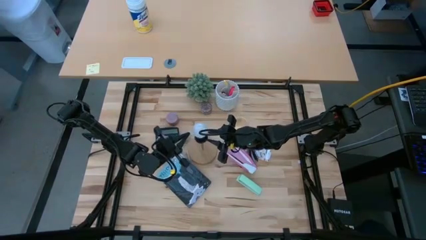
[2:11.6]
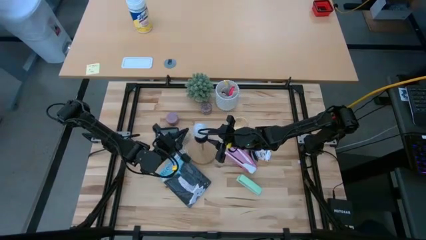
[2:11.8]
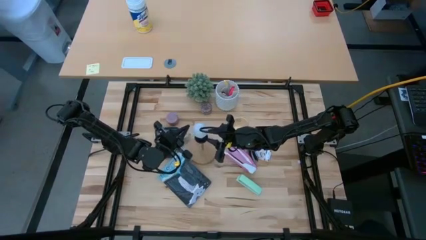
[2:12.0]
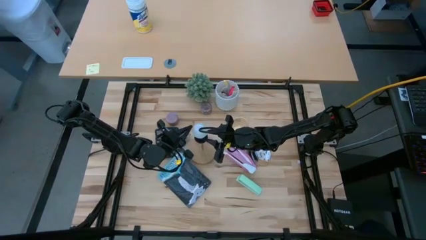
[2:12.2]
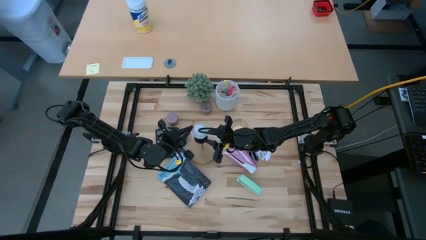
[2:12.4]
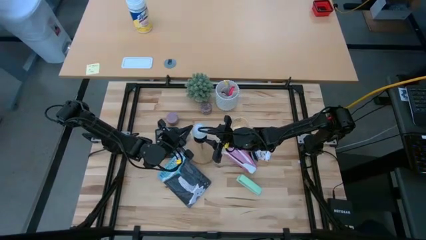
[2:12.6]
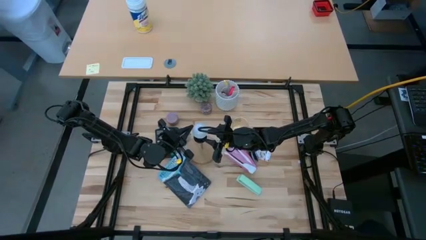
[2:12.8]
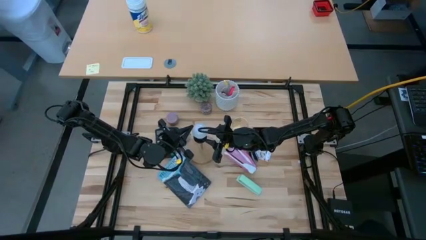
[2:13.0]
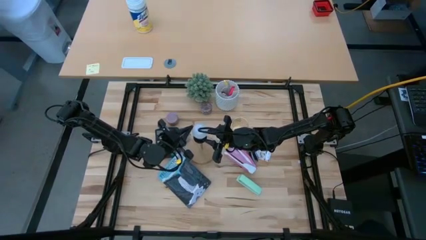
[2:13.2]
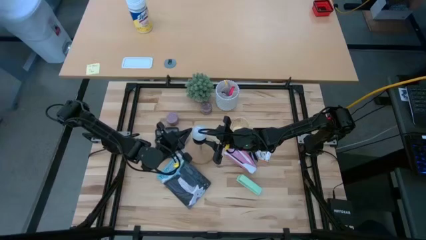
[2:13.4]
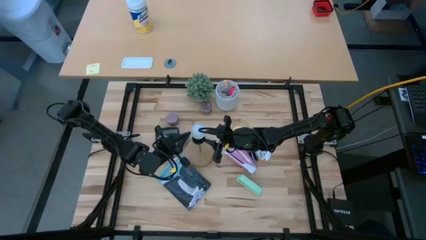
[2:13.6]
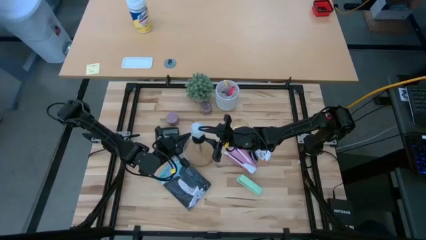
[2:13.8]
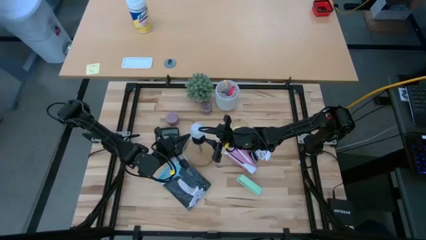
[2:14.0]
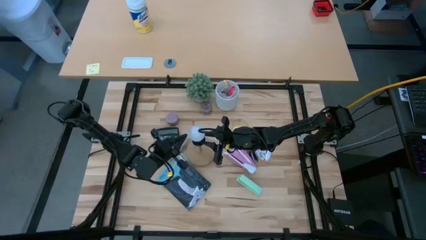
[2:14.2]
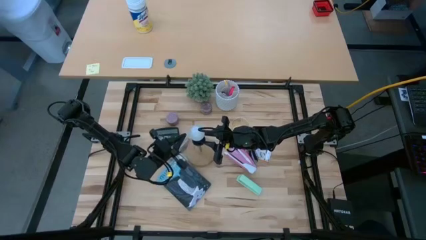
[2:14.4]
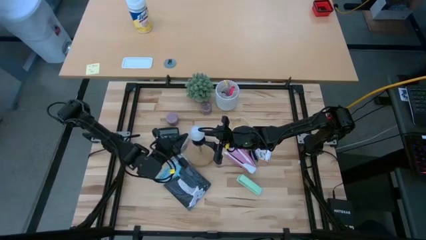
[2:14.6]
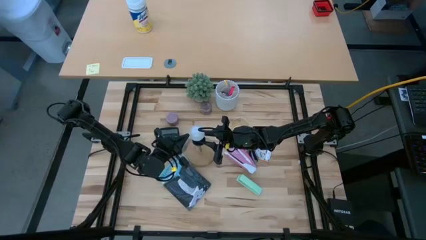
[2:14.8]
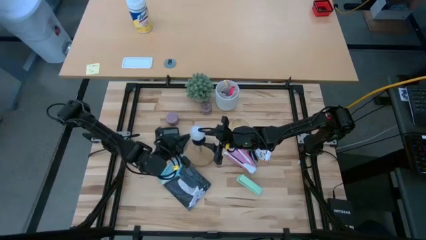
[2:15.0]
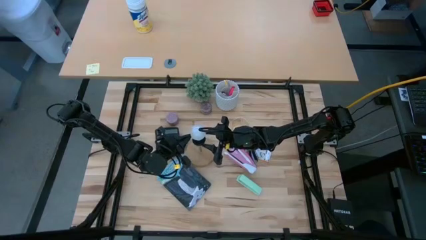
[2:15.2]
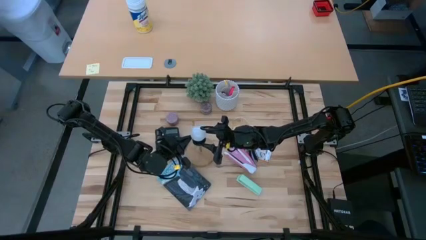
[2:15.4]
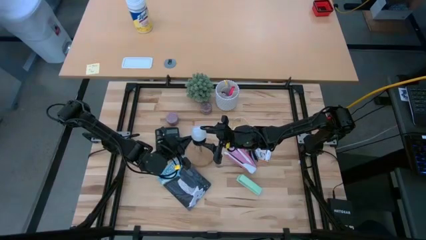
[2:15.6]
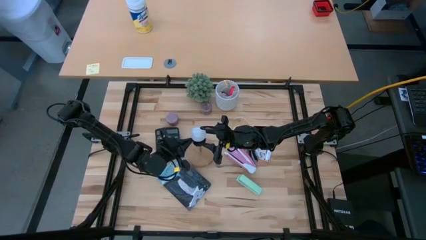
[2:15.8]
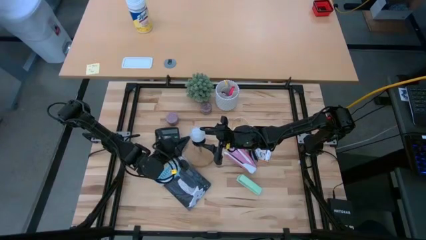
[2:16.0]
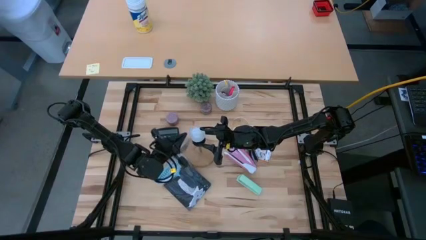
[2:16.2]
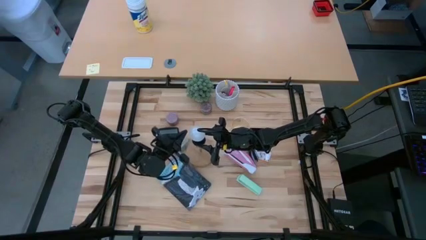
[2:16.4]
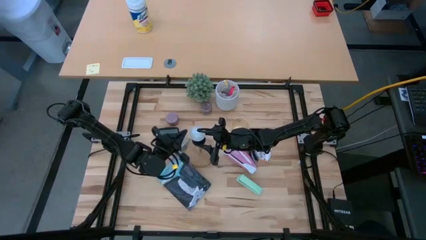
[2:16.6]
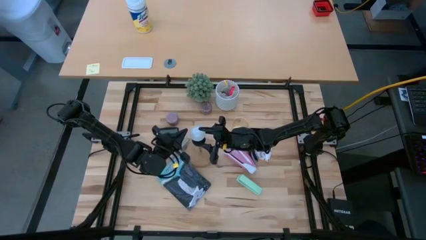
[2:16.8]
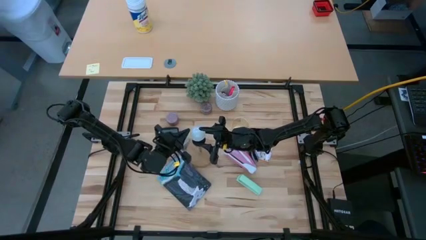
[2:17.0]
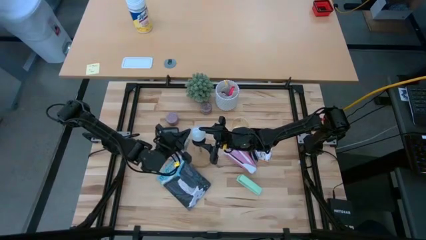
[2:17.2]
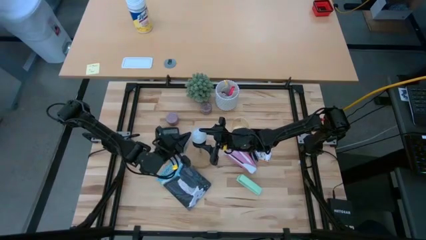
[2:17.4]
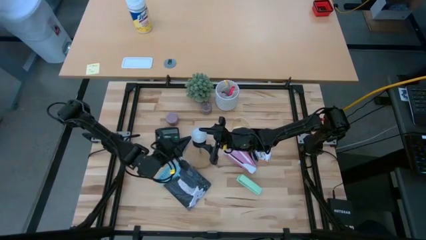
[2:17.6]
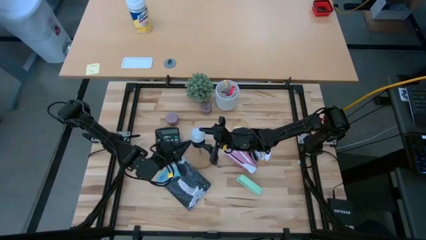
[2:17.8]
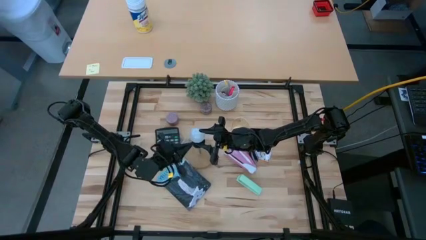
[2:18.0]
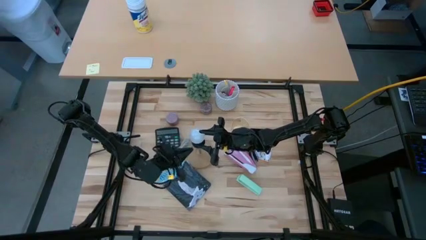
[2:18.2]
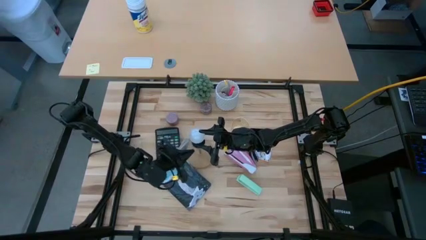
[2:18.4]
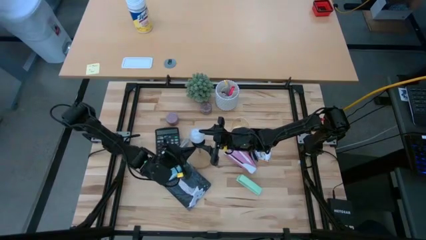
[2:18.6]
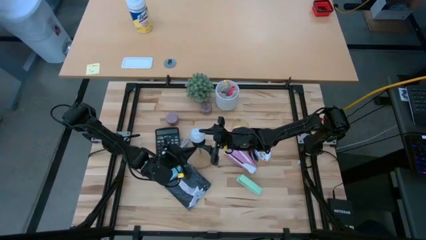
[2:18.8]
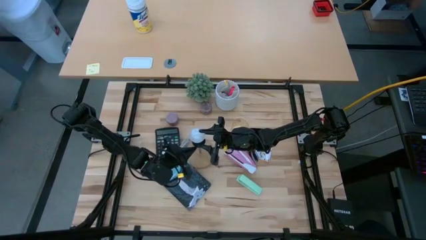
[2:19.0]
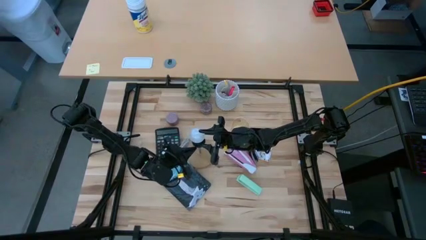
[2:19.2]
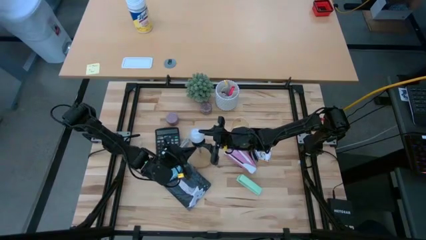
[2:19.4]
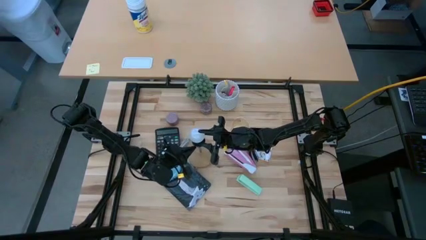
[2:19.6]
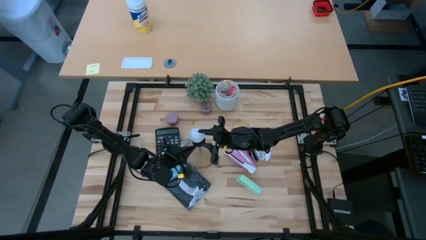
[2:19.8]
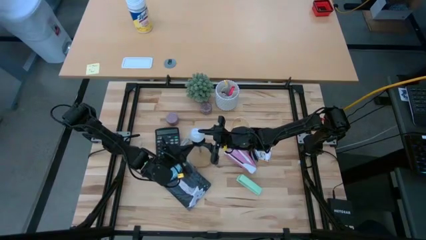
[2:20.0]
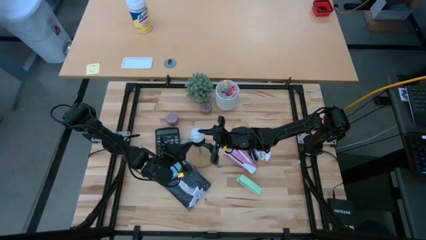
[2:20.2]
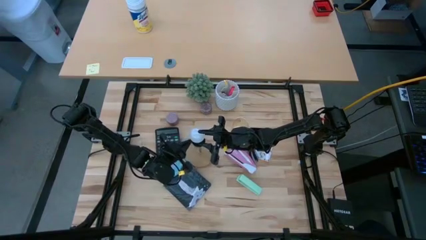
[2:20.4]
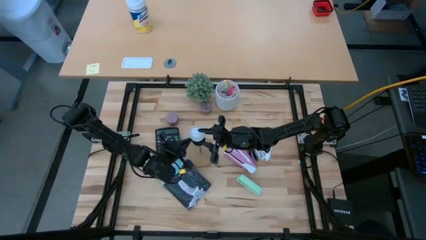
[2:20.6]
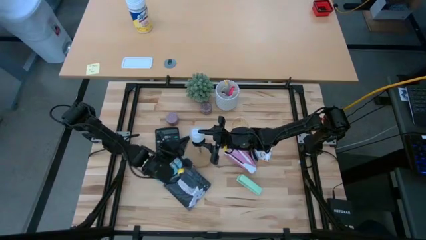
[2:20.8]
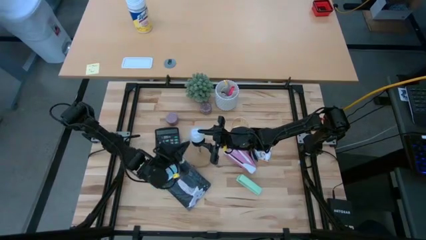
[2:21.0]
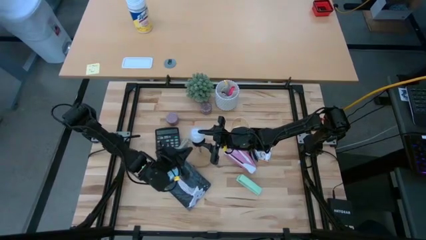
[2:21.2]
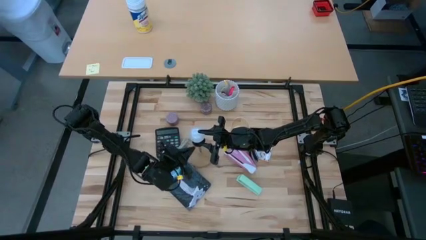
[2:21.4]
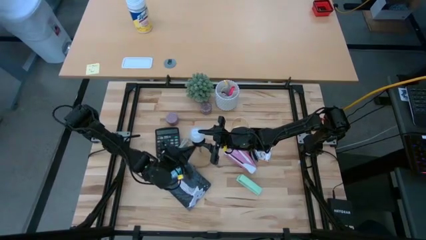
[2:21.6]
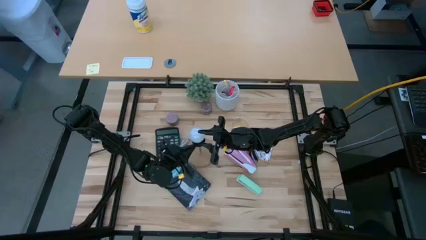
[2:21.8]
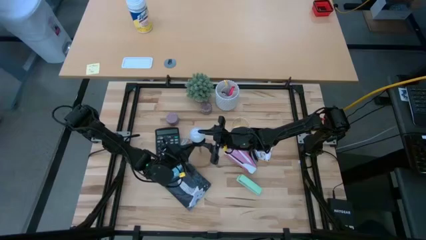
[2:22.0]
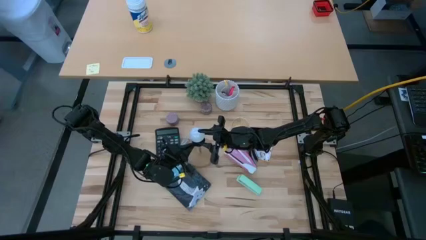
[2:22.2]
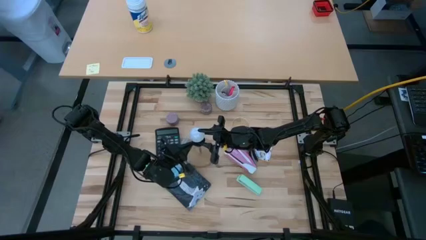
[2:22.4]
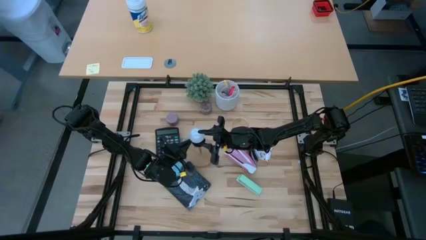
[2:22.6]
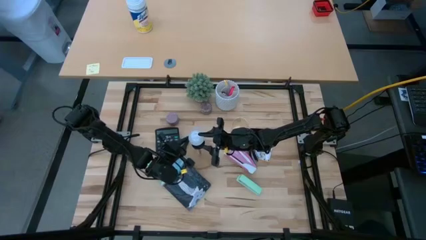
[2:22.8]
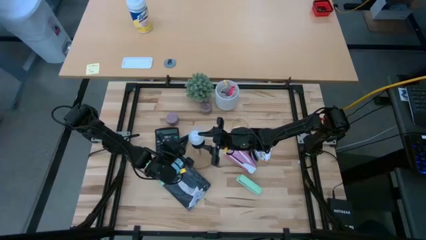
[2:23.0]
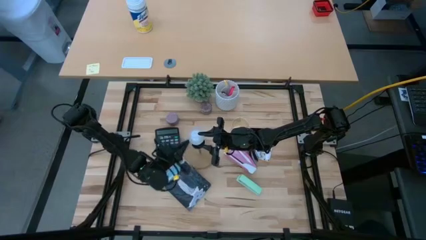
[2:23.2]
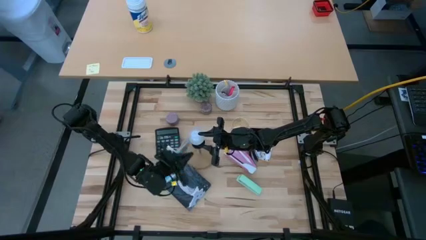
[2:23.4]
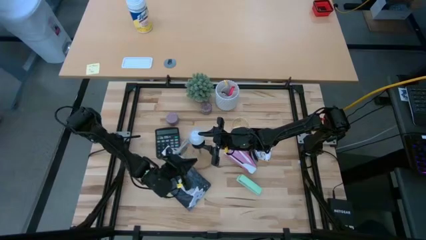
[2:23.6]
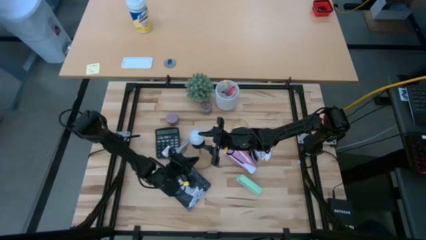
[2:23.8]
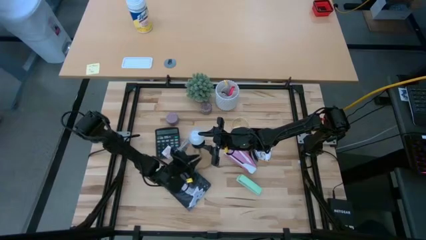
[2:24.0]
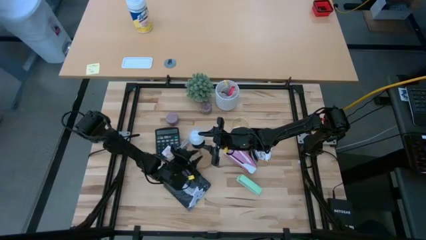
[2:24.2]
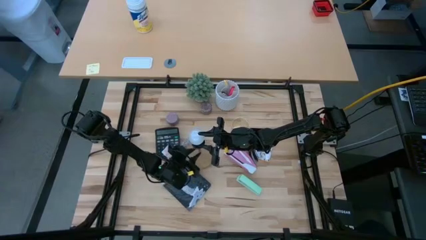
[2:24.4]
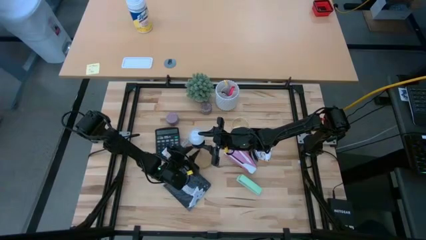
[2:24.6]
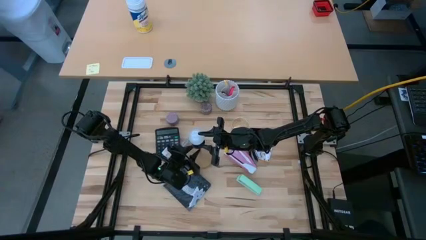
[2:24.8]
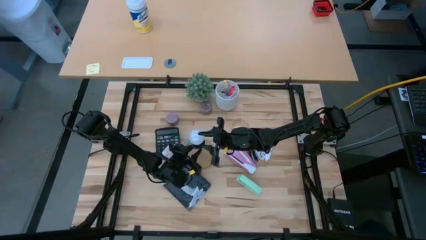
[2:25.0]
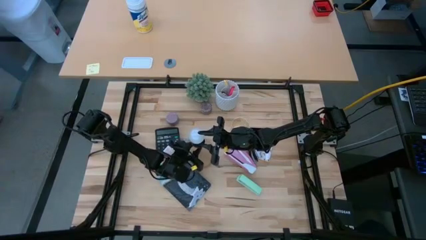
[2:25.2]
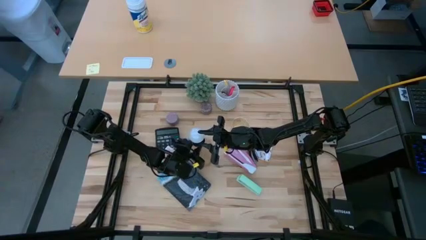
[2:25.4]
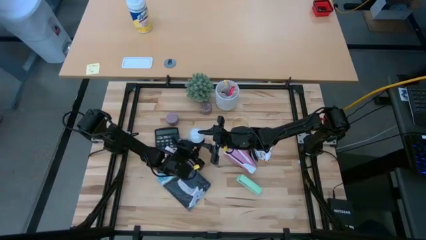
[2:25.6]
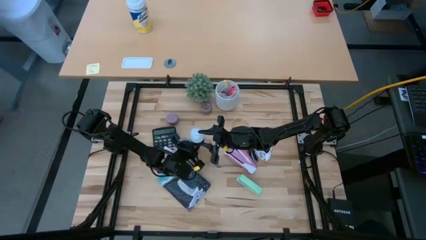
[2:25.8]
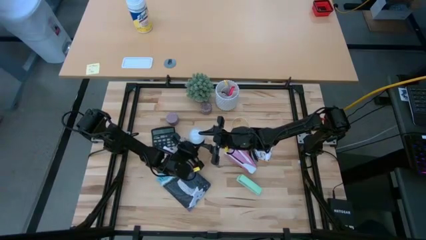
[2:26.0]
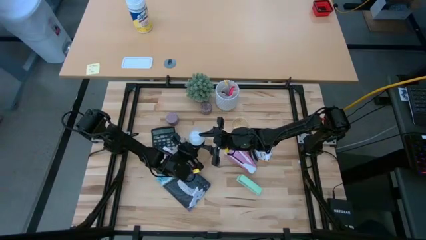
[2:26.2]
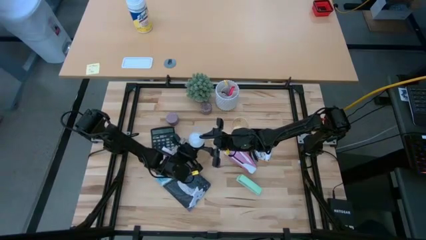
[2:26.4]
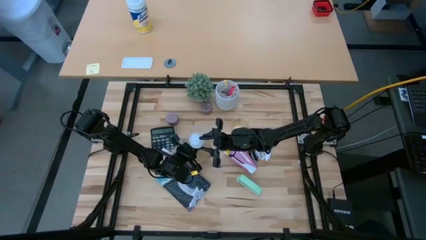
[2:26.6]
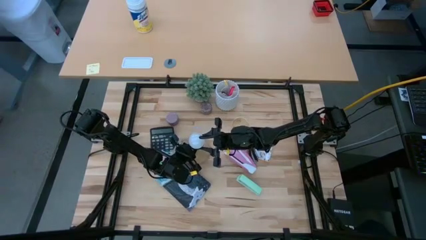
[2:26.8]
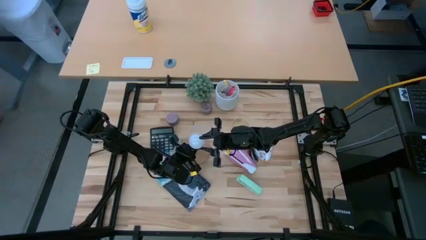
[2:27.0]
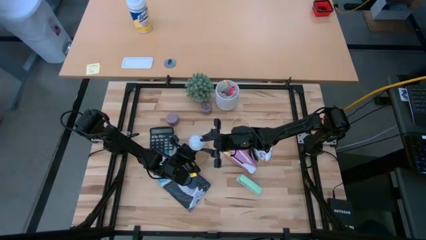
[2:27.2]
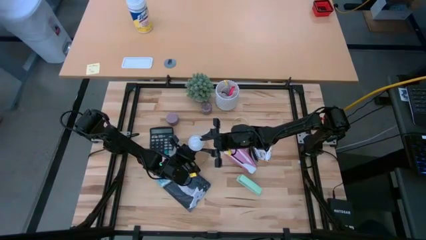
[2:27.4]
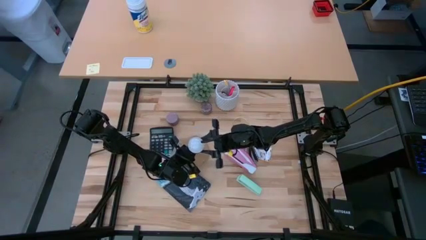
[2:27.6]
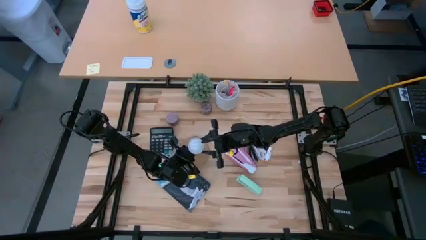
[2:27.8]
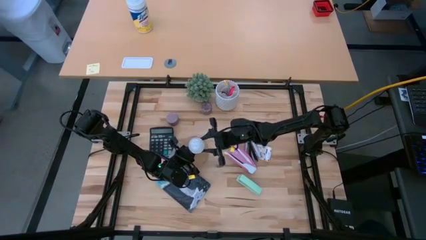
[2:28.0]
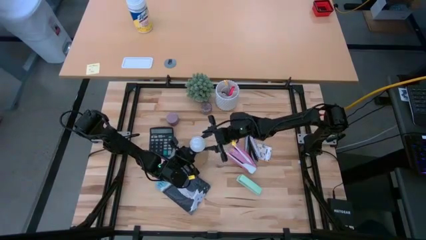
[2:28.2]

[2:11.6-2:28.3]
Task: Screw lightbulb
Remove the lightbulb from the lamp
